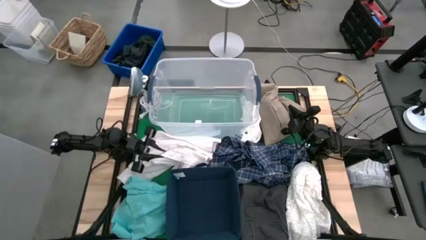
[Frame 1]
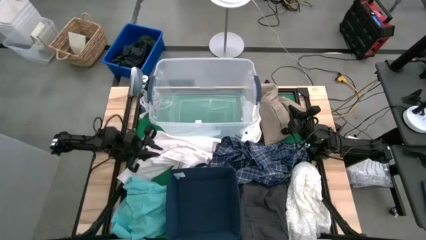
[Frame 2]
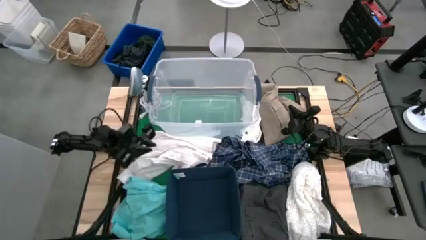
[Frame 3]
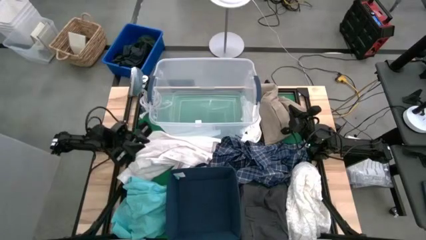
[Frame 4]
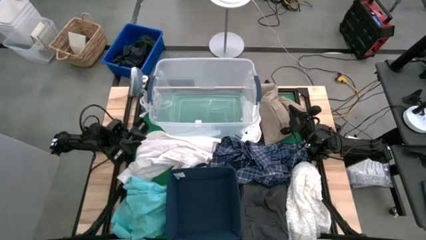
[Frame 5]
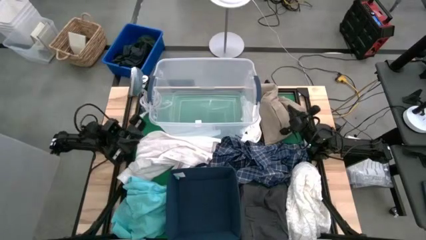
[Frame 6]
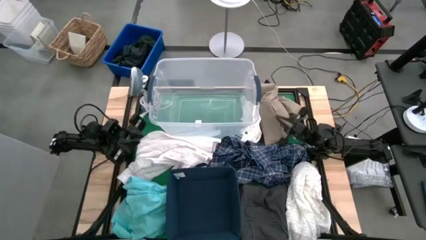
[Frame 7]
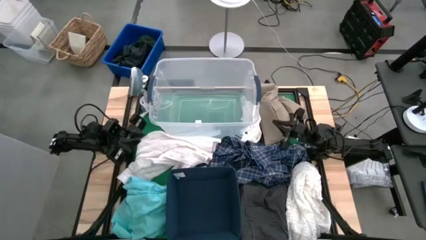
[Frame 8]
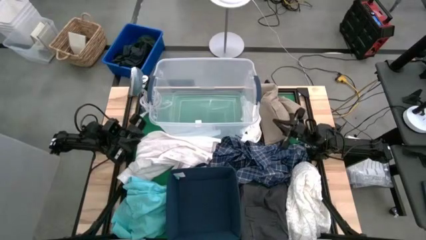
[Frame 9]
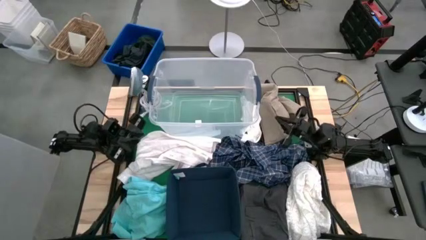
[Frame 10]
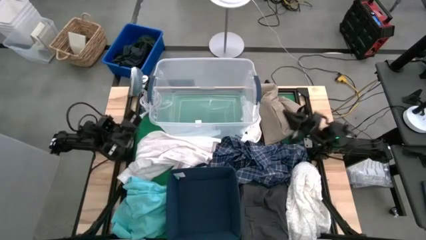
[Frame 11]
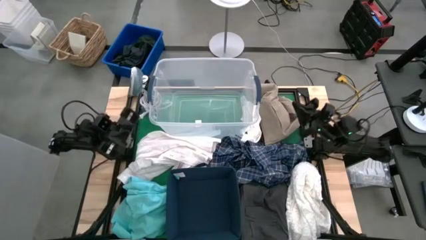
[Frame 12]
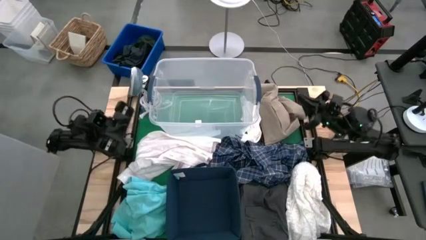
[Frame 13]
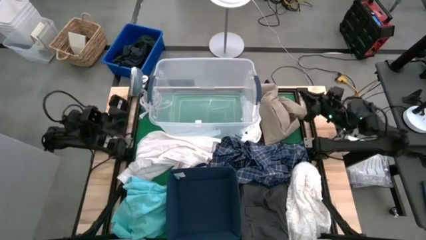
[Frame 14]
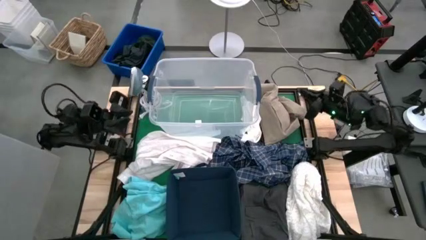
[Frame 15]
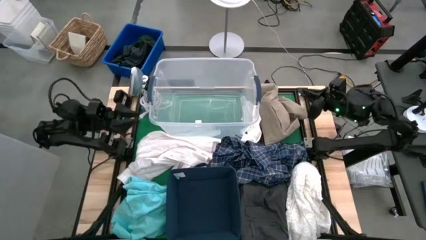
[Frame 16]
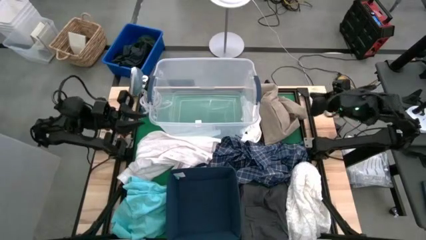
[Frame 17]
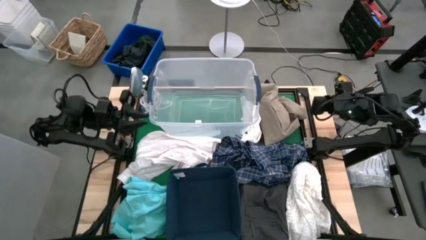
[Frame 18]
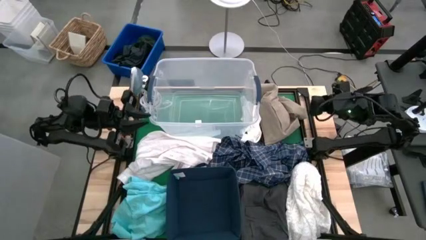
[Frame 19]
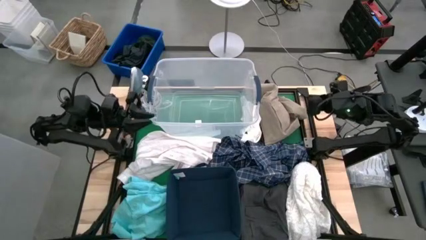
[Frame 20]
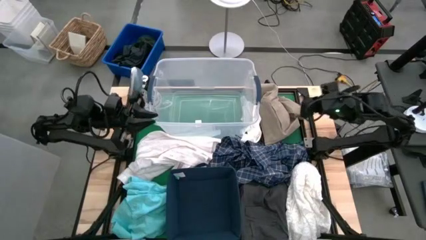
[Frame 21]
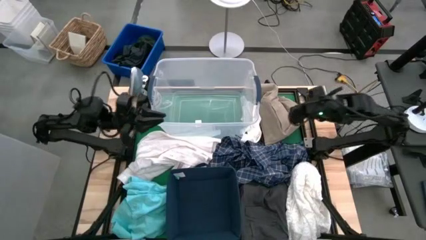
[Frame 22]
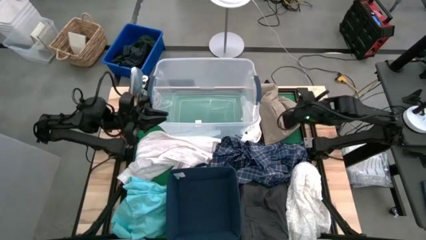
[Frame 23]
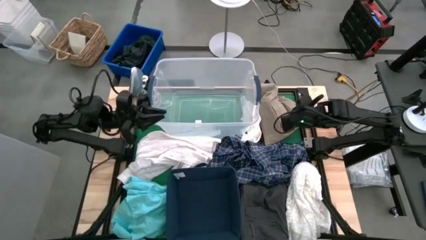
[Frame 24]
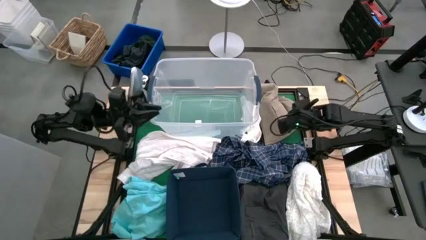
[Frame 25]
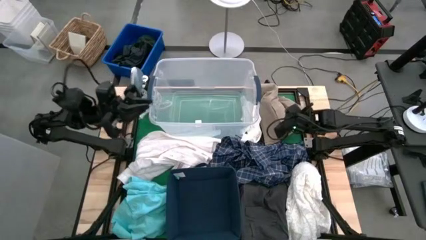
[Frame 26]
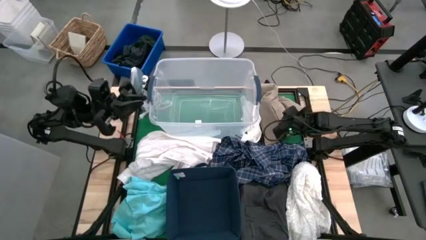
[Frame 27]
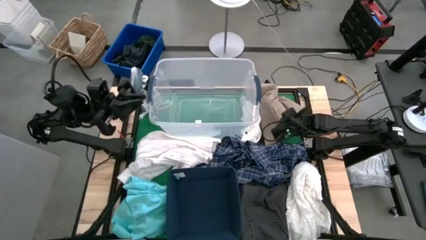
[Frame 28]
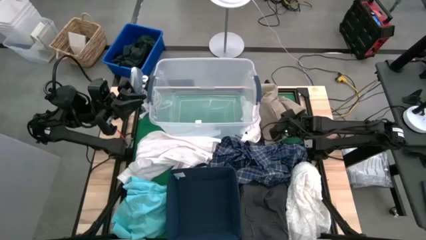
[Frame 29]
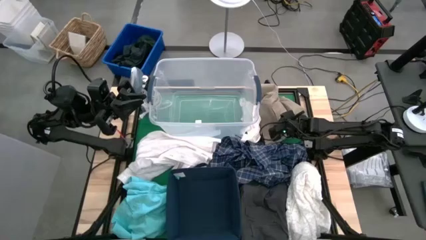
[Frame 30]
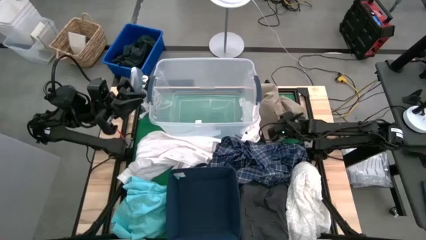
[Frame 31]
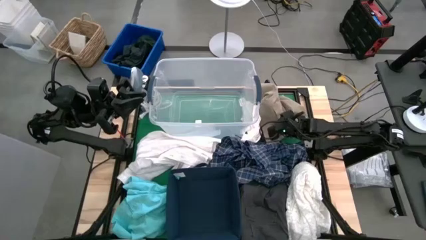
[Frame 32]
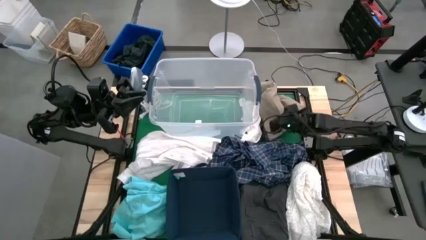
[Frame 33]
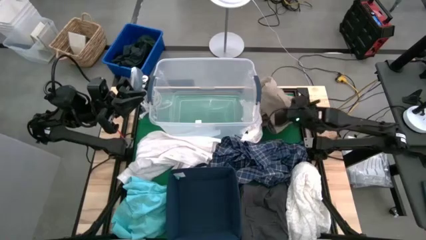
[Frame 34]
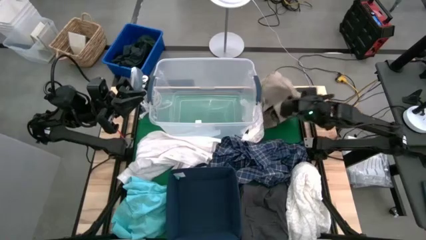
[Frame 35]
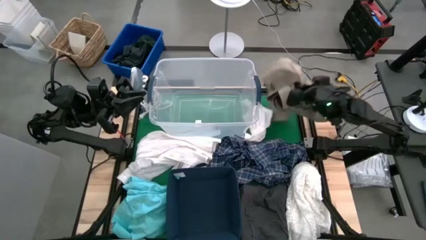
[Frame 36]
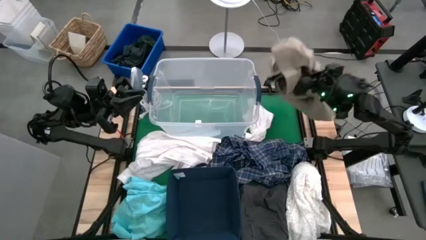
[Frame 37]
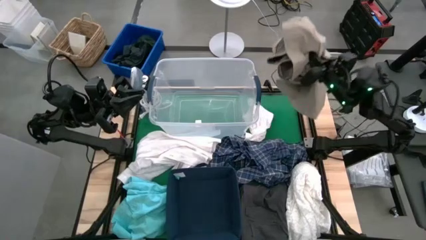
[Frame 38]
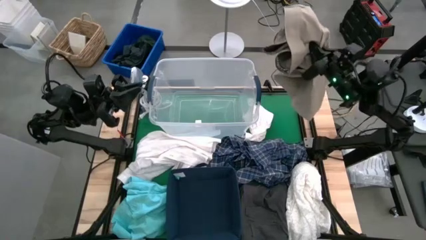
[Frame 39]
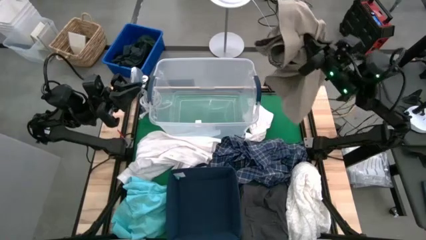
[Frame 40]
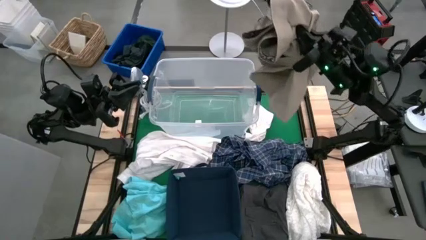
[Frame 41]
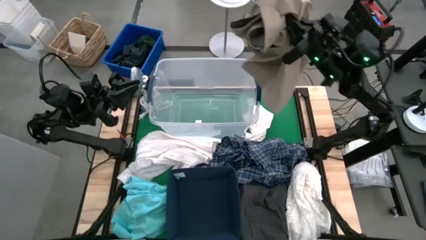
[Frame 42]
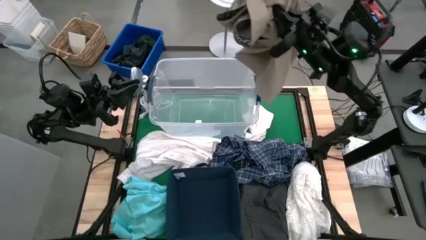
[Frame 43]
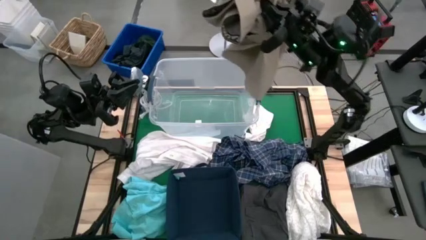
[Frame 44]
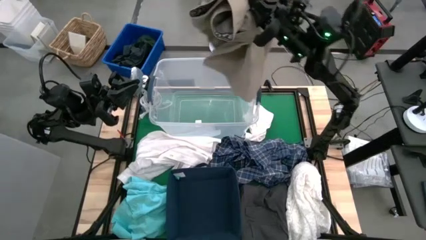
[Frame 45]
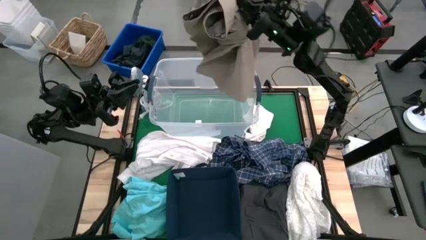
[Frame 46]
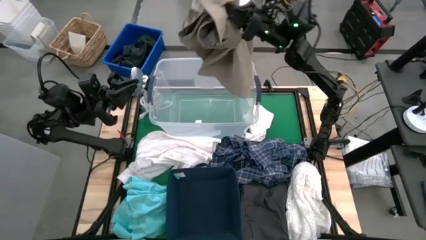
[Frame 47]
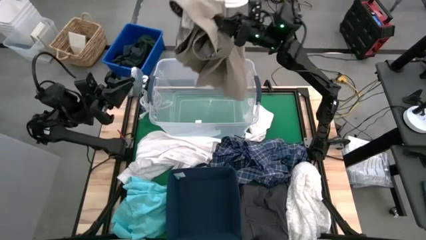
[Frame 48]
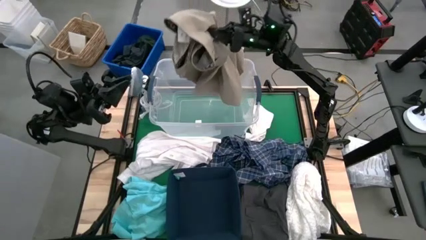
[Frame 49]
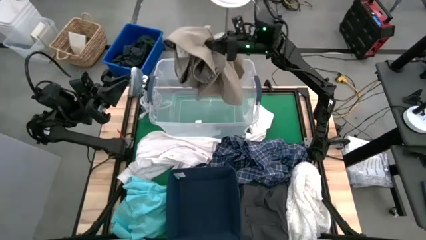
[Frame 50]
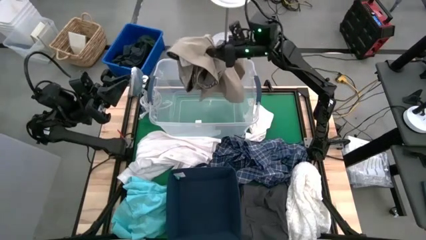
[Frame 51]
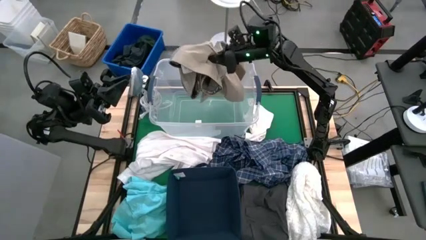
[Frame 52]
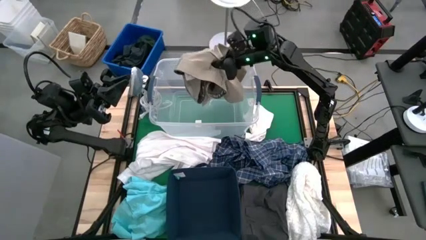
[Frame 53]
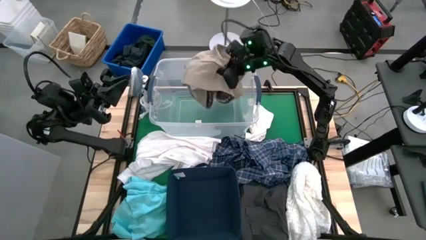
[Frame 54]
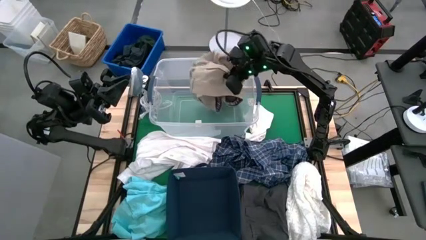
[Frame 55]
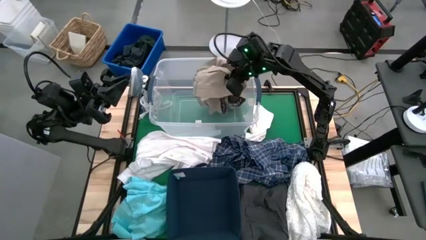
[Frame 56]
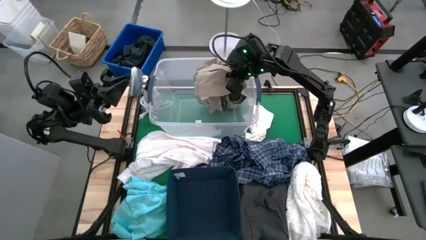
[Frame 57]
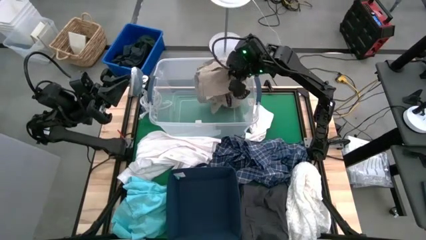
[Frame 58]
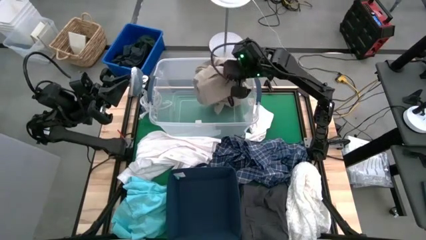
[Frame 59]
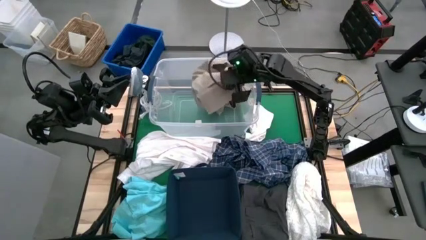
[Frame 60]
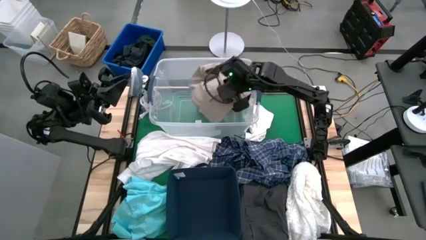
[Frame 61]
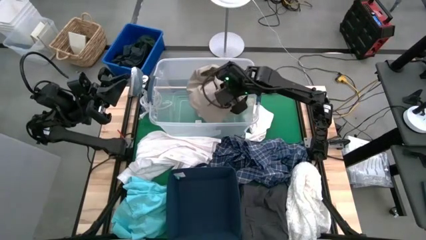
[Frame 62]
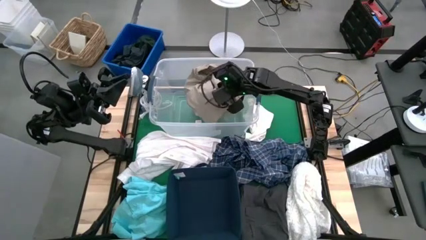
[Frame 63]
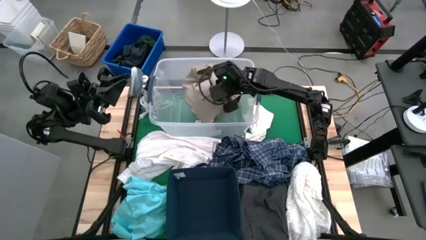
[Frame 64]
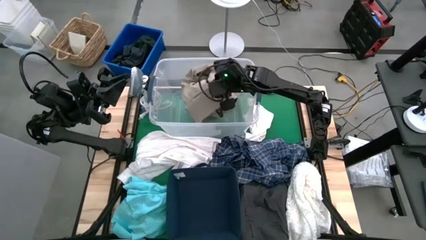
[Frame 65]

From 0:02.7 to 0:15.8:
Task: Sort clothes
Put the light brown shorts into the transparent laundry bin

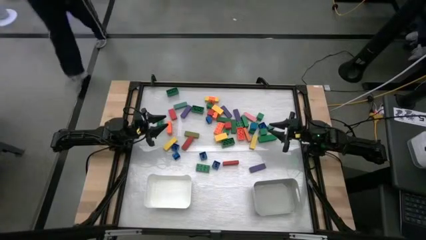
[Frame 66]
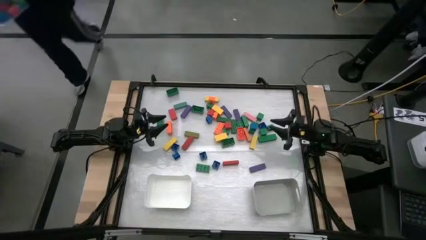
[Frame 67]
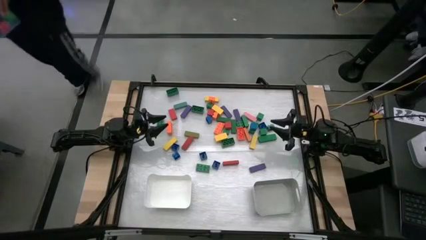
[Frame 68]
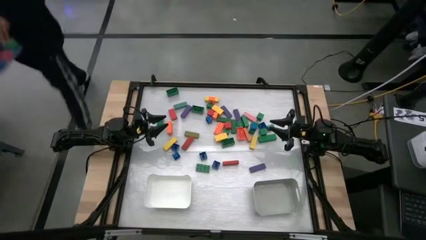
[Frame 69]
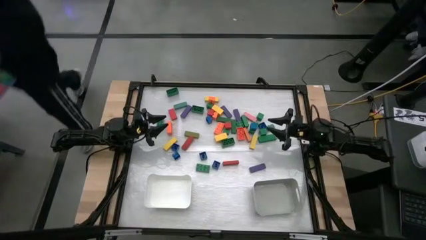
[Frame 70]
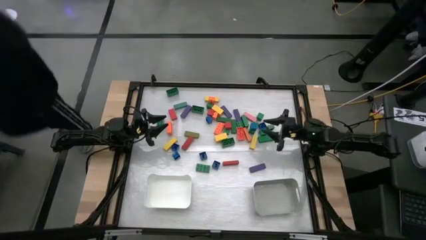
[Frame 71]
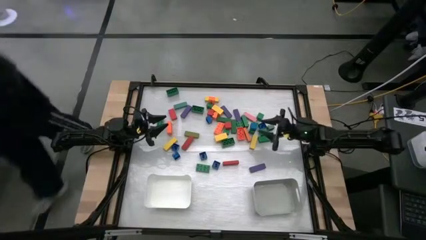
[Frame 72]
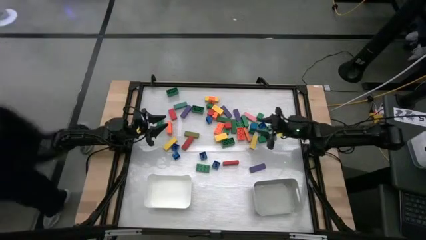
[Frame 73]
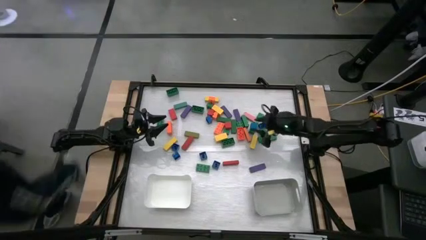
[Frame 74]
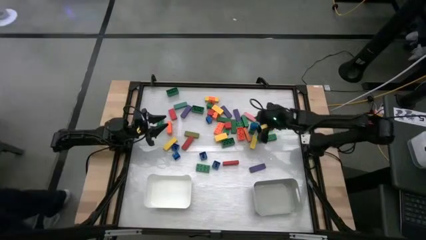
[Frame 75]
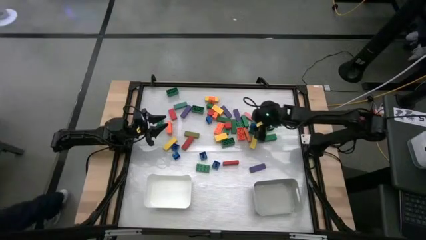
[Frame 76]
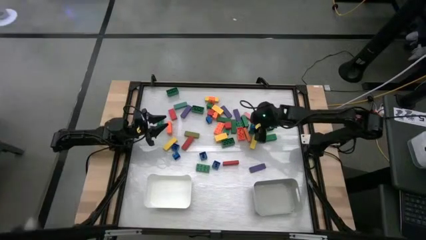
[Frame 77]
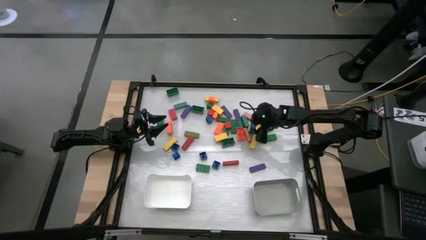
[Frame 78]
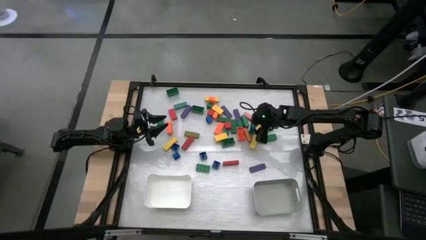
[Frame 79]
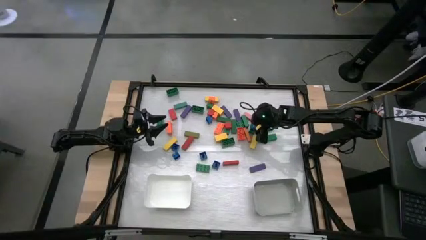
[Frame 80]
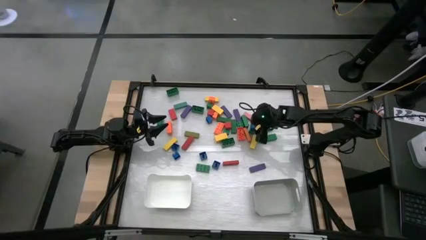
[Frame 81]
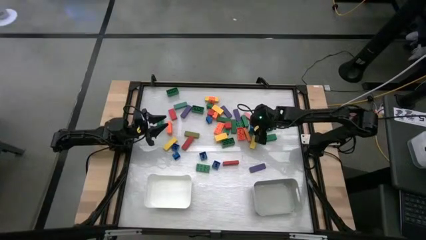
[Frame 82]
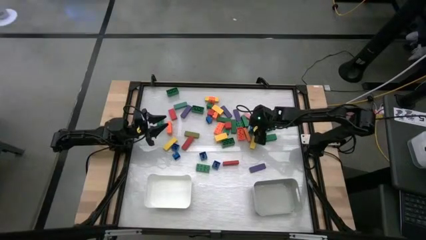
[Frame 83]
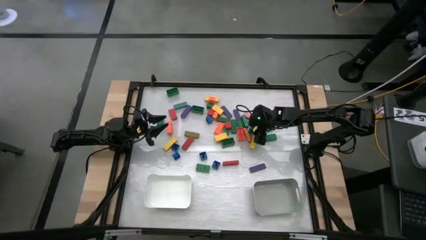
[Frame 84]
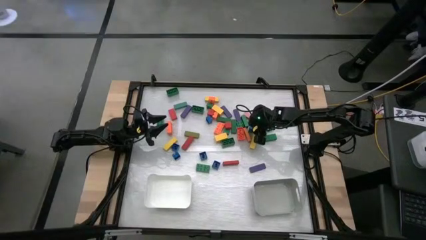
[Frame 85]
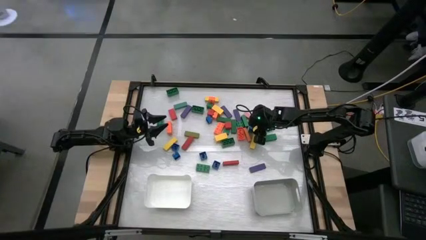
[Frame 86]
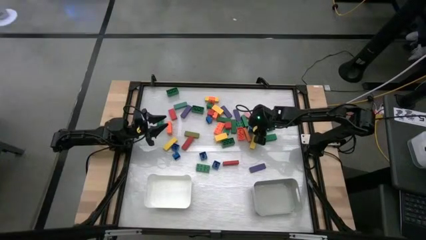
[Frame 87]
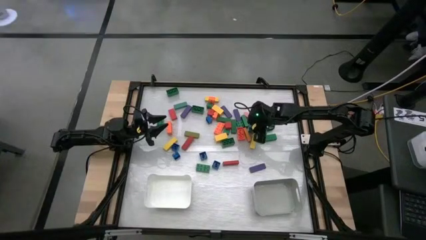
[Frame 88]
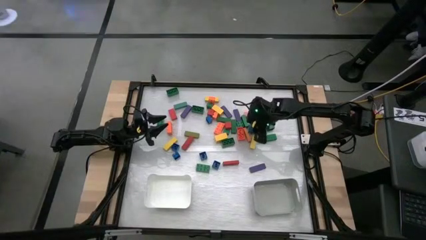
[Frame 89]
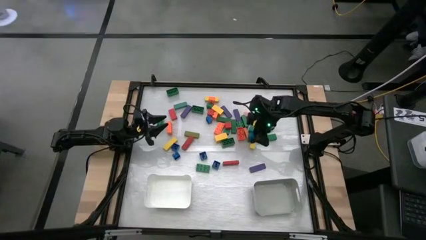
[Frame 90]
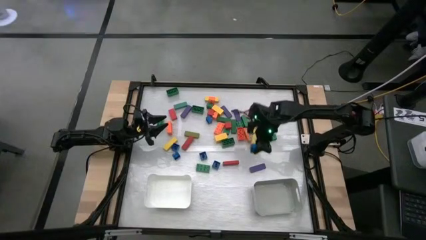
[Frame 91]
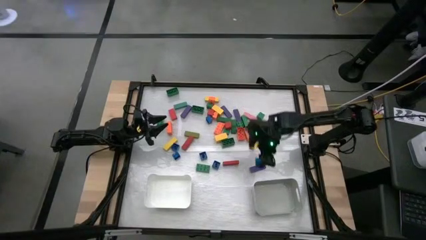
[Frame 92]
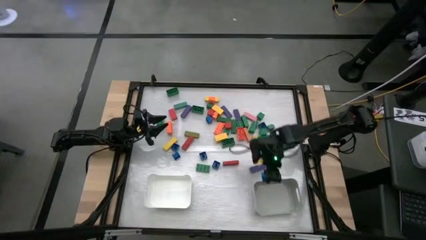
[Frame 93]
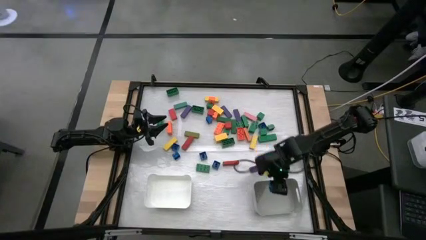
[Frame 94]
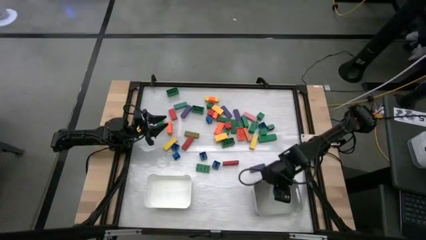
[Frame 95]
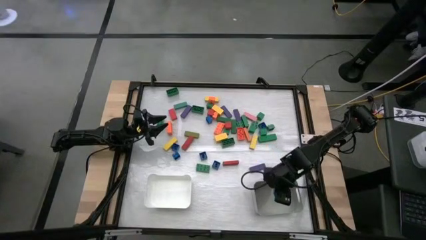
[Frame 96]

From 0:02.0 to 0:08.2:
Task: Sort blocks by size
Put the square blue block into the gray bin
